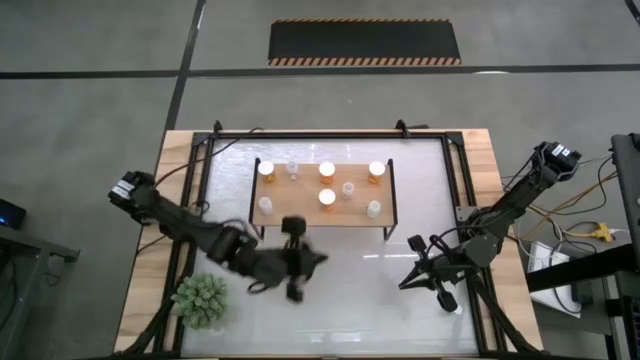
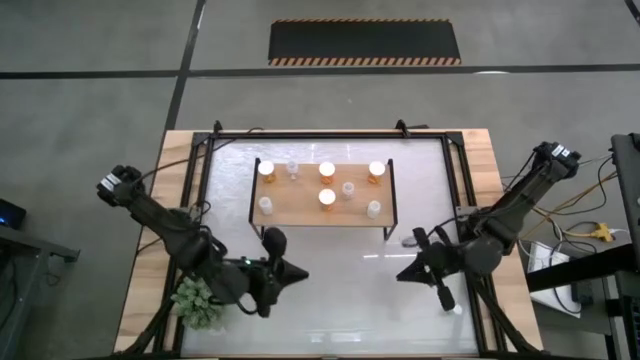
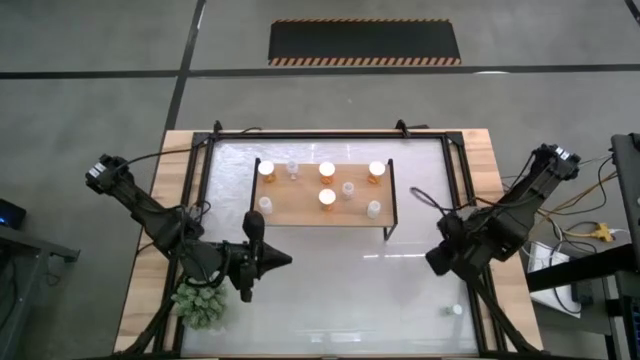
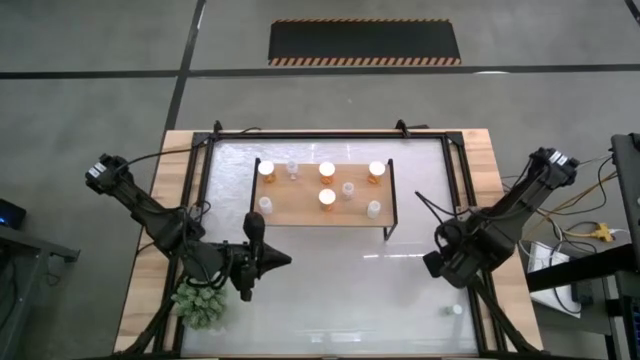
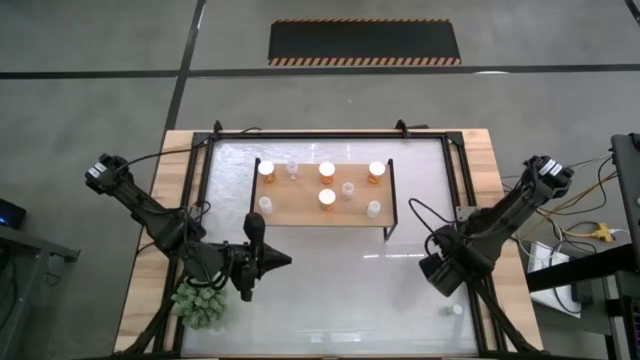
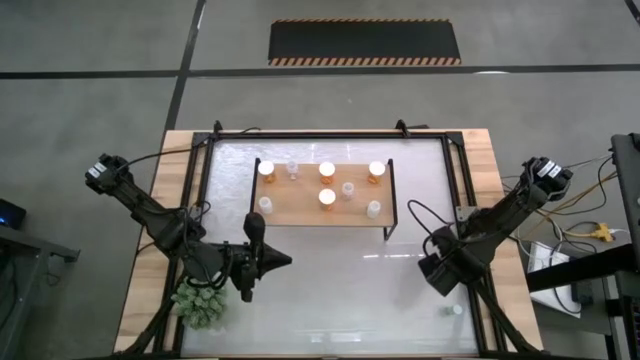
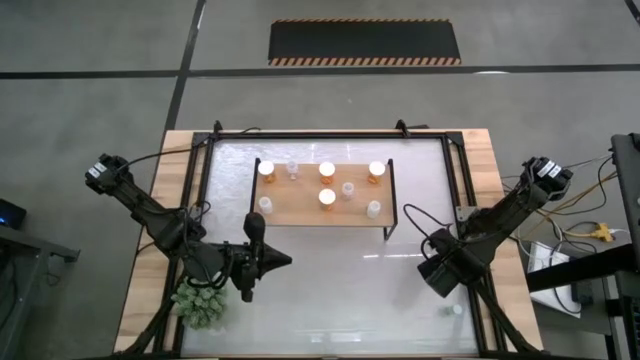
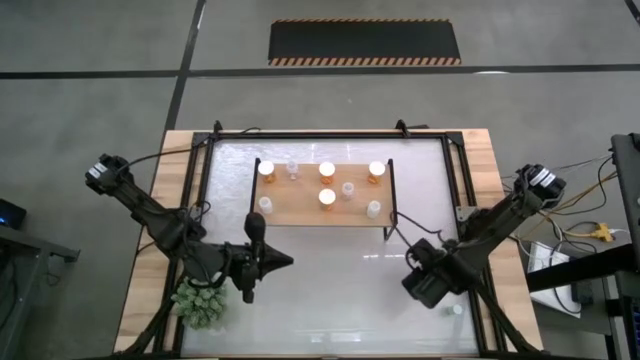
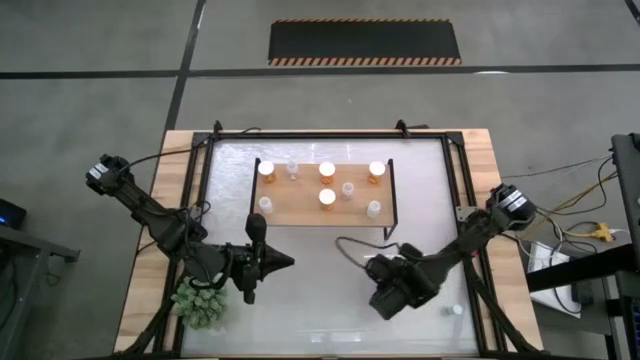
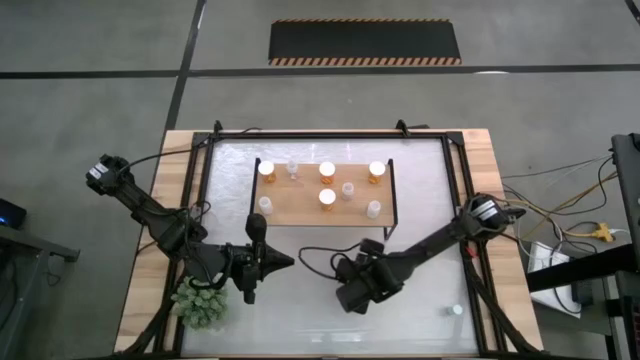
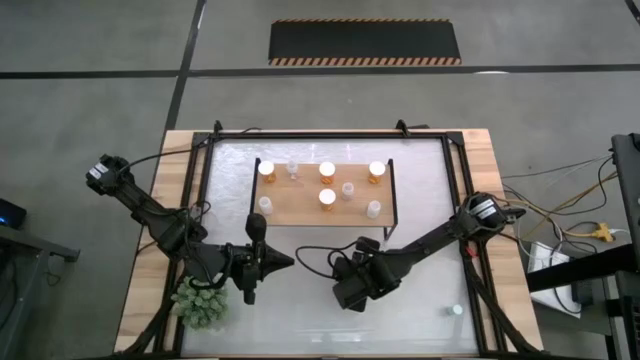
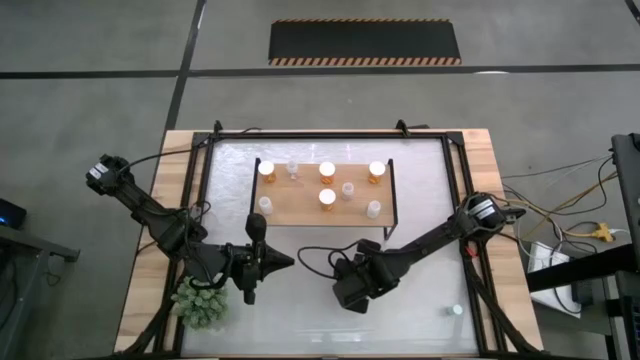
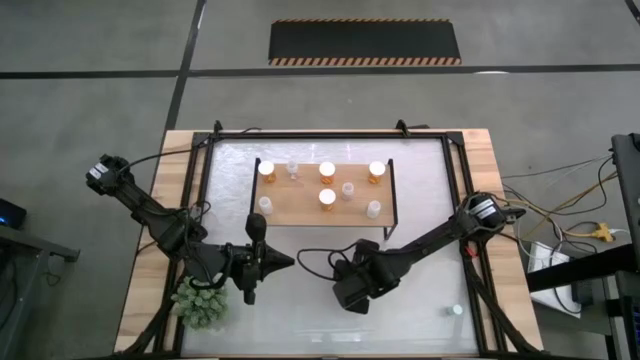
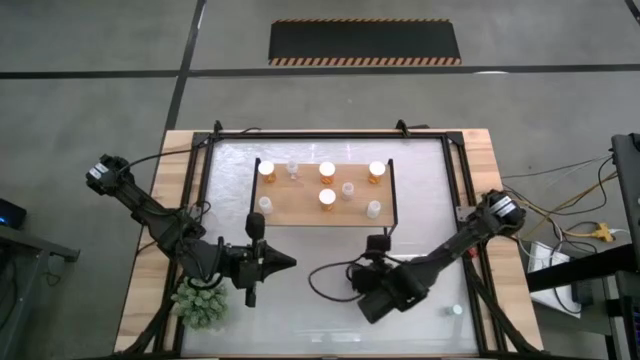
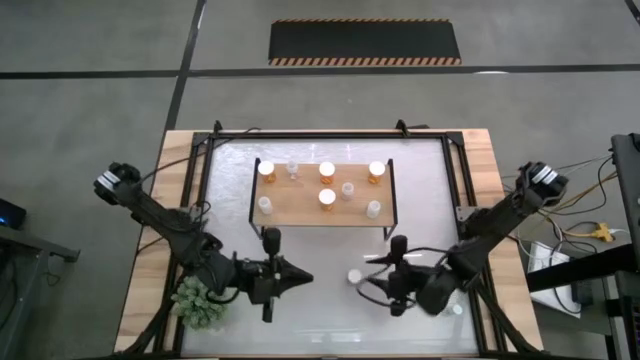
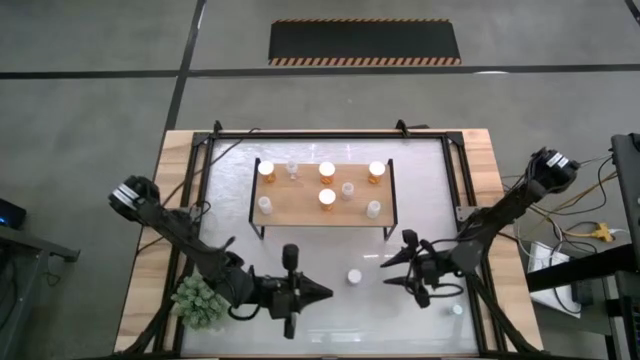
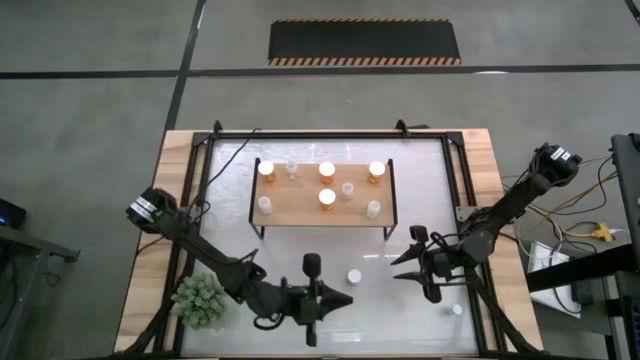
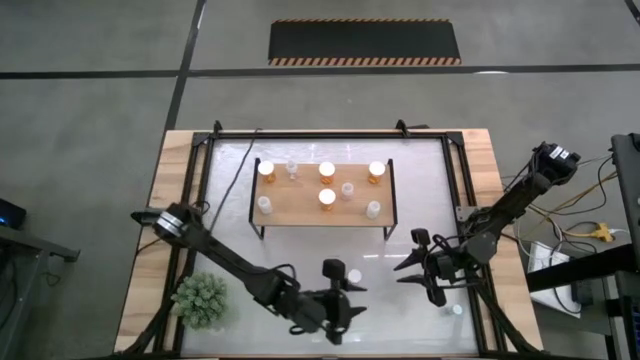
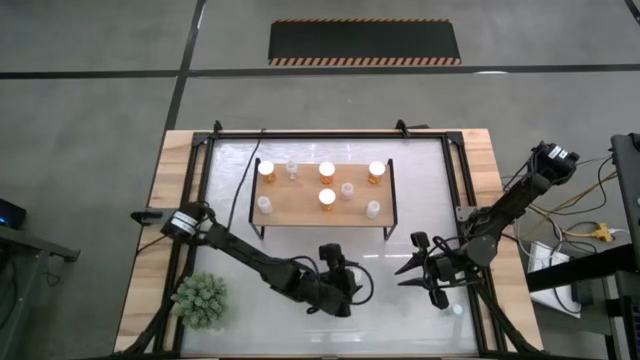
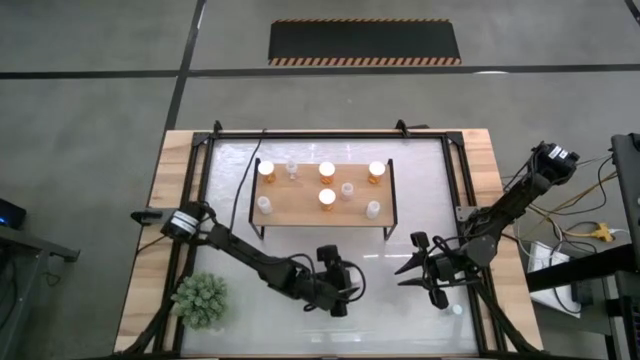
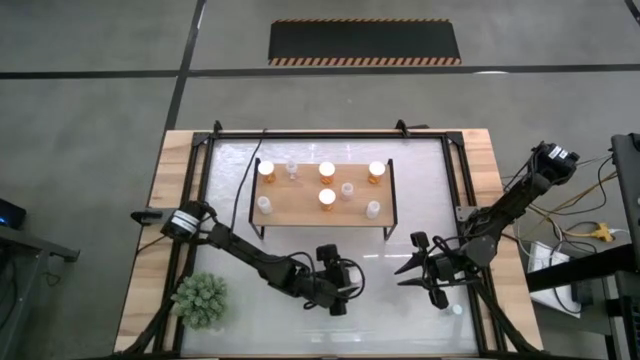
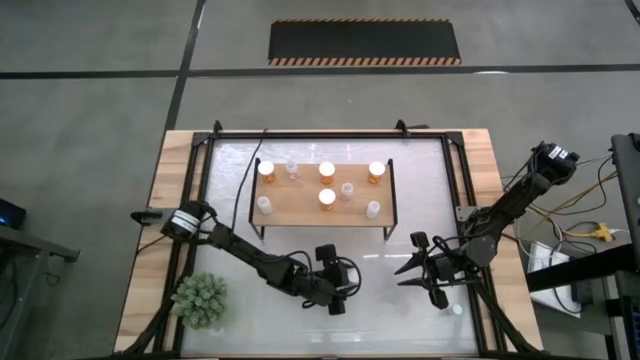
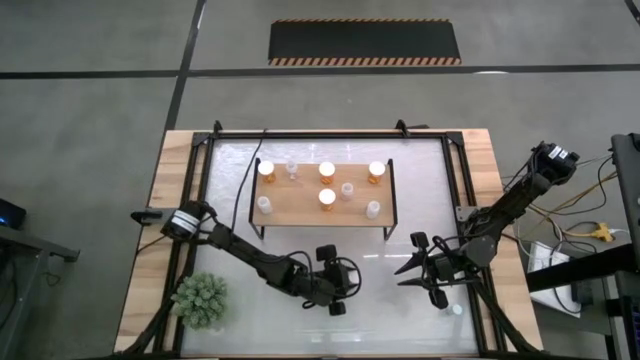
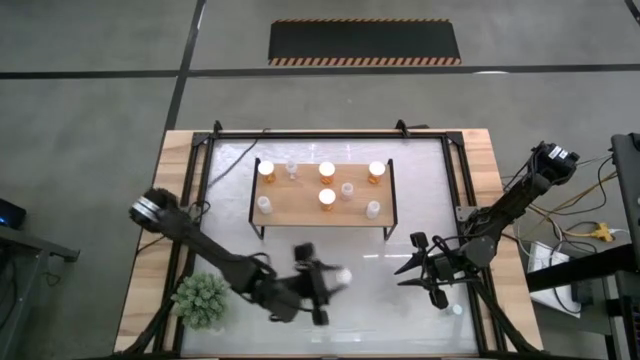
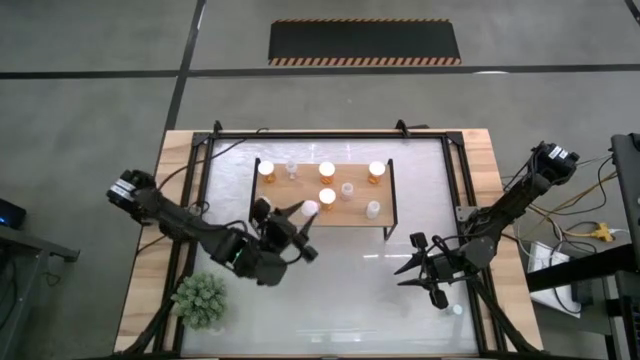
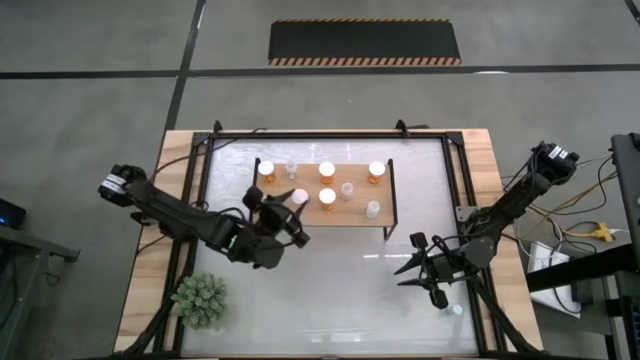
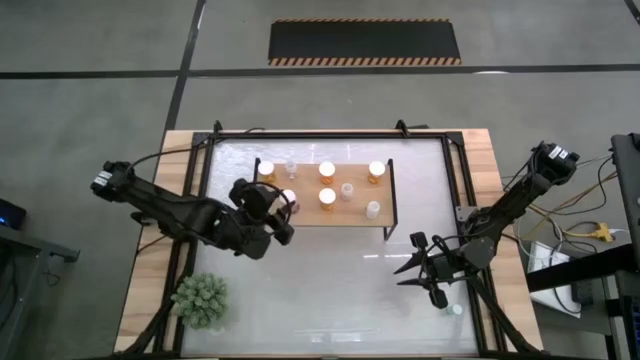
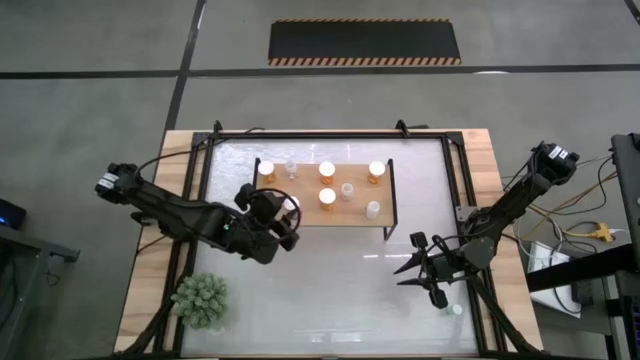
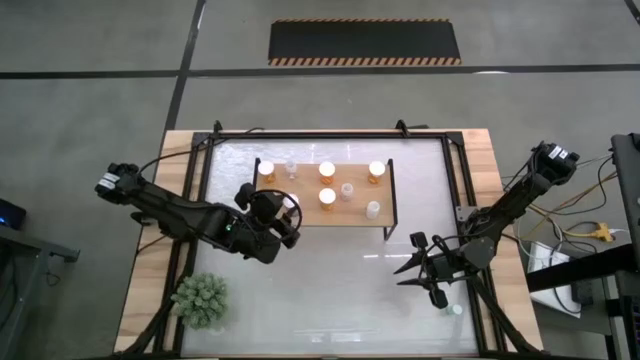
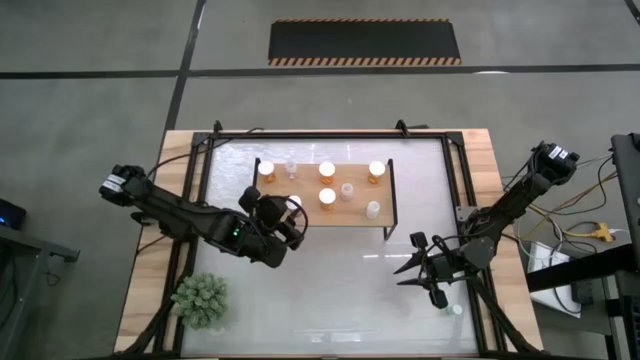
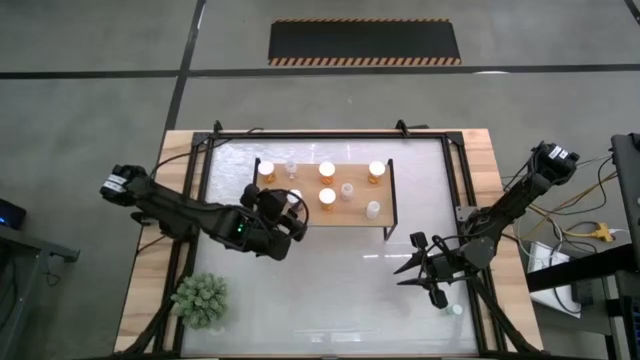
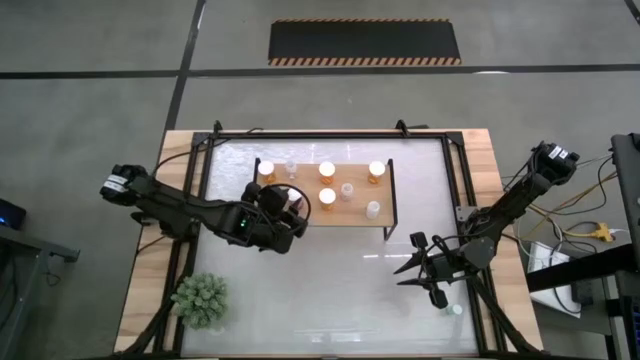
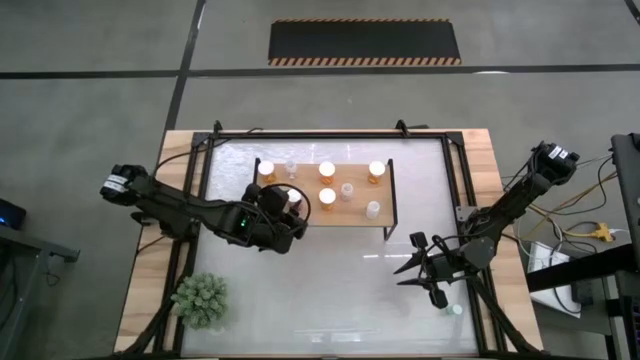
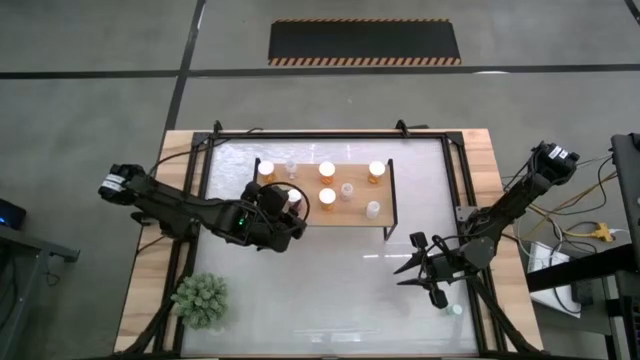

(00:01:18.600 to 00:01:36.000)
Task: Pick and place medicine bottles onto shelf by color
Put the pink pill bottle on the shelf

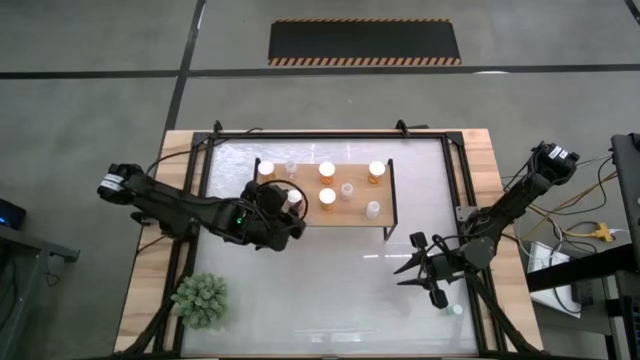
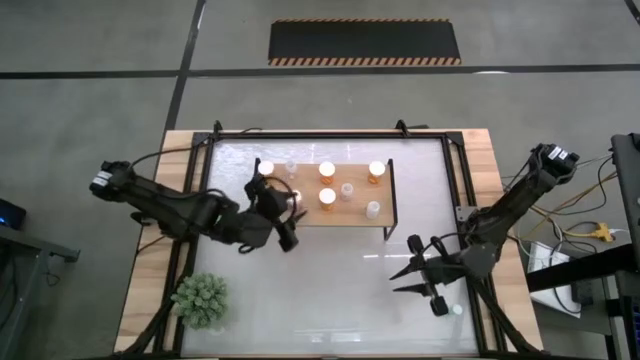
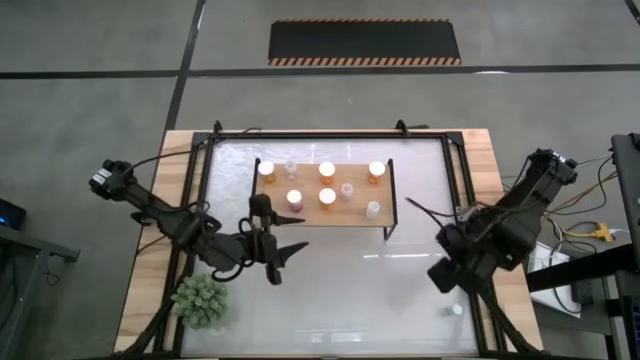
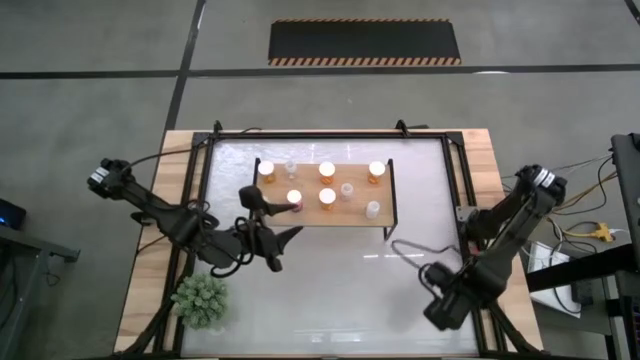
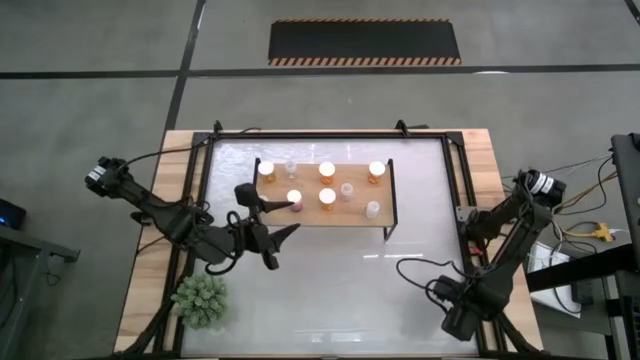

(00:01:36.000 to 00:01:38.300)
Put the green pill on the shelf

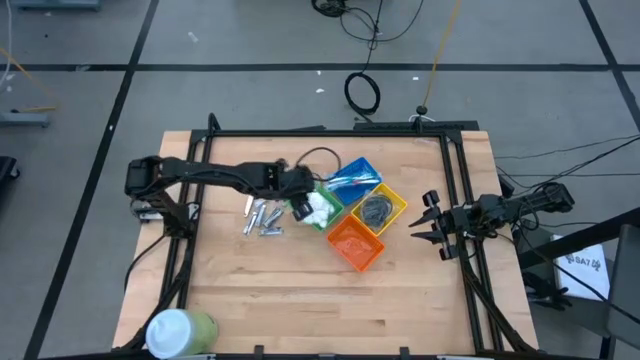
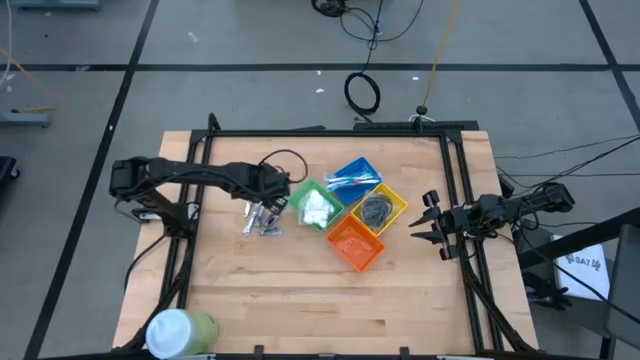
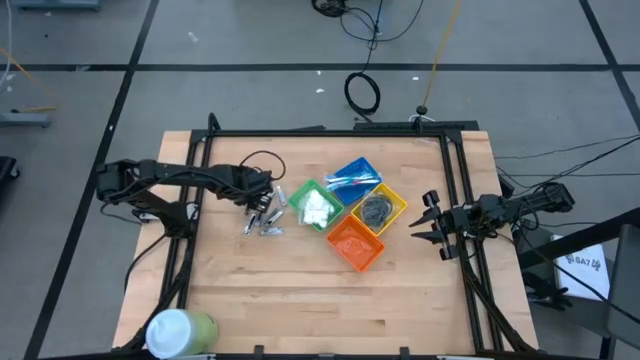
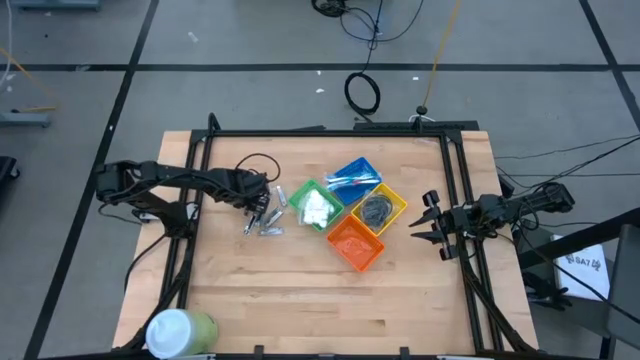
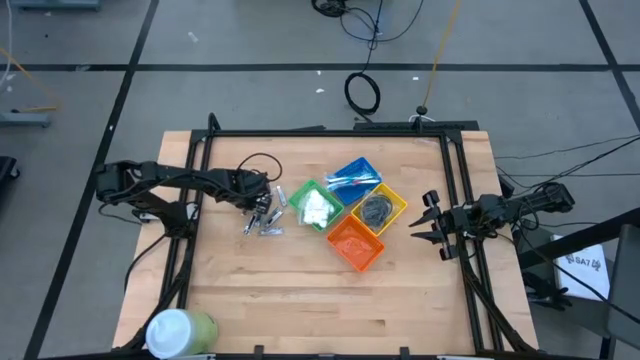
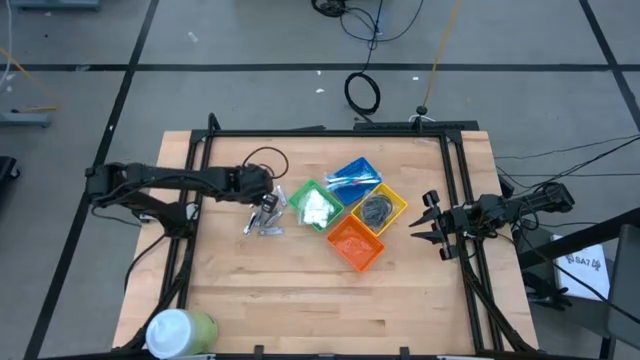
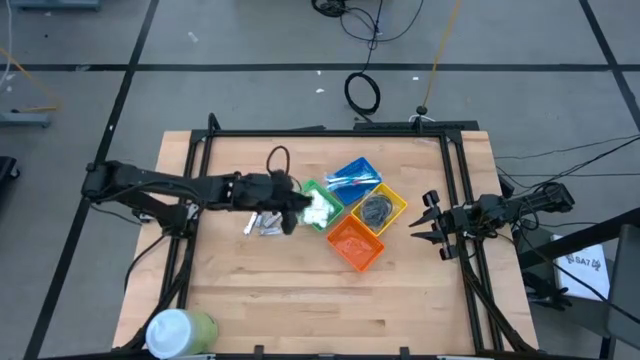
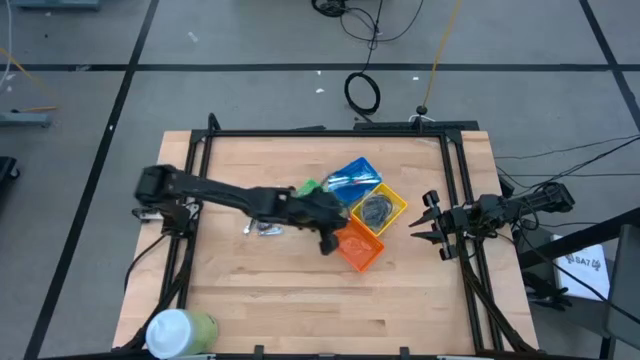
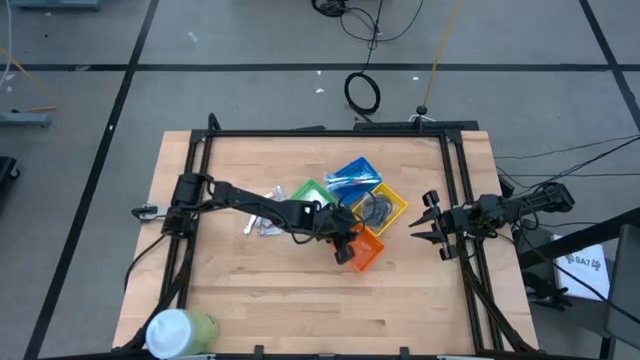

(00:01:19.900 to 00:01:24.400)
Task: Pick & Place Travel size toiletries
Put the silver nail cutter into the orange bin
